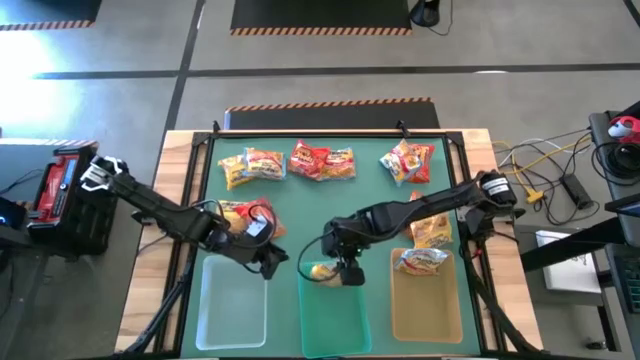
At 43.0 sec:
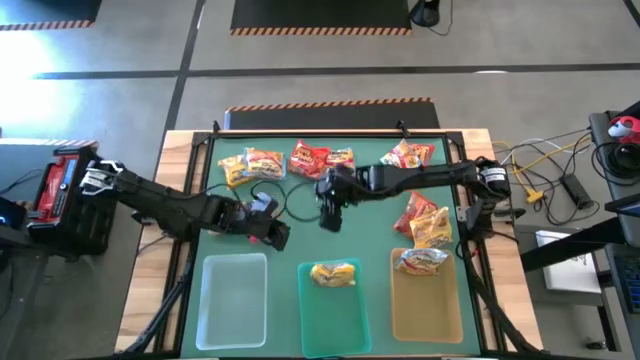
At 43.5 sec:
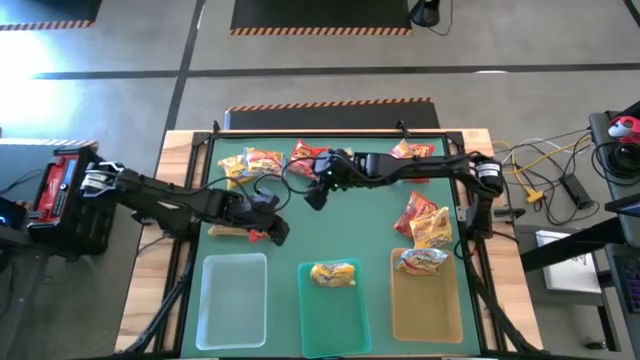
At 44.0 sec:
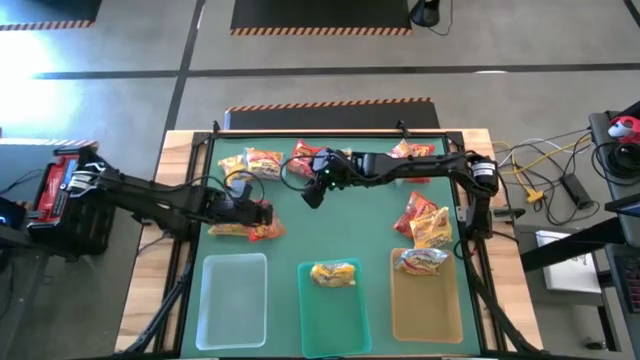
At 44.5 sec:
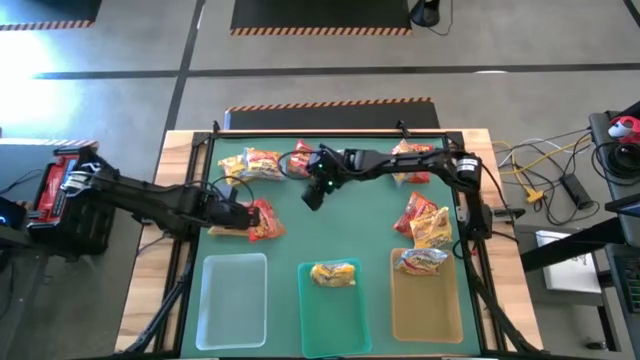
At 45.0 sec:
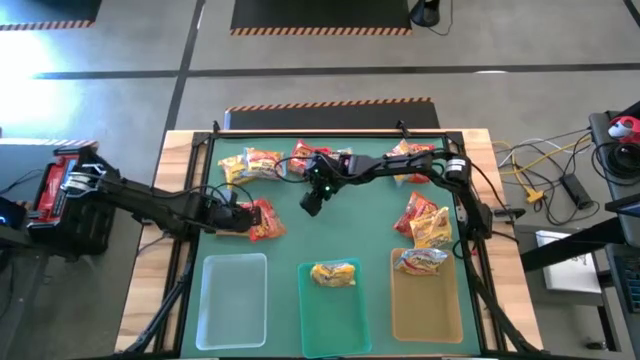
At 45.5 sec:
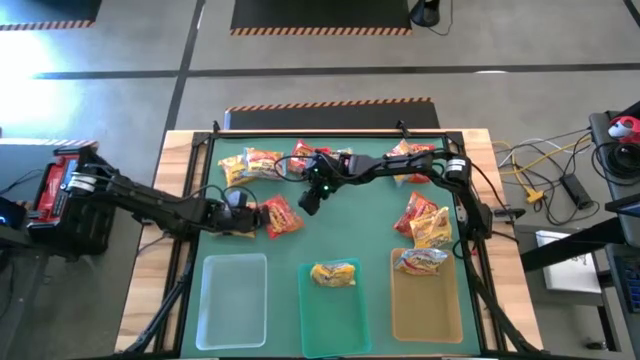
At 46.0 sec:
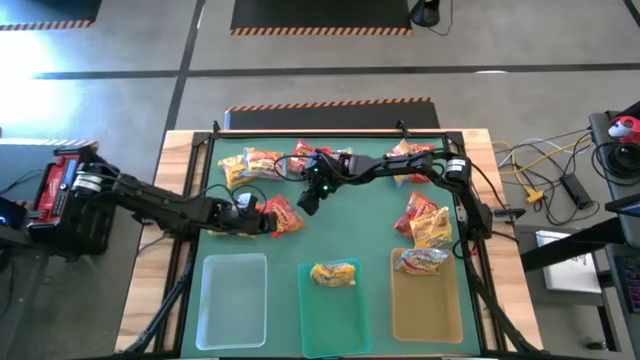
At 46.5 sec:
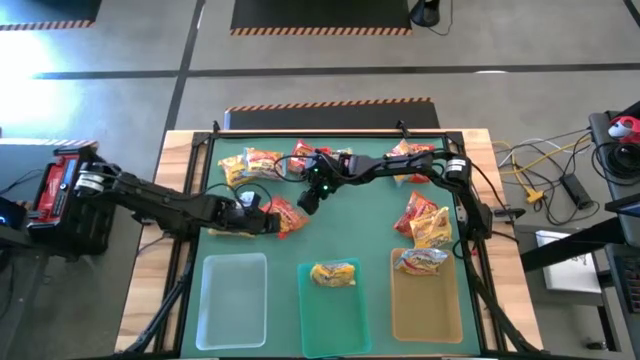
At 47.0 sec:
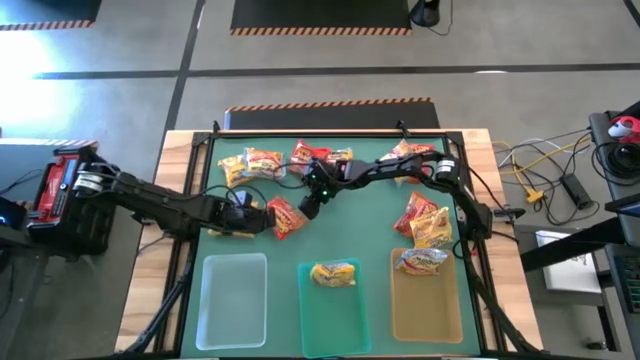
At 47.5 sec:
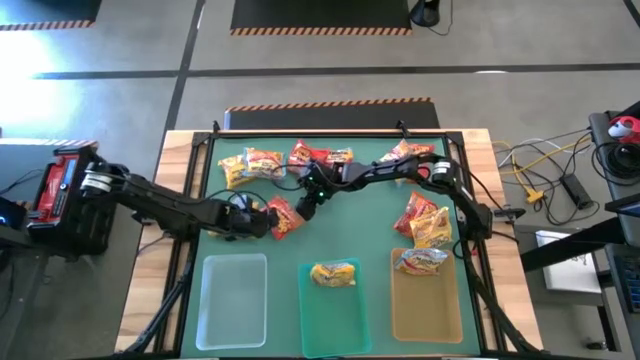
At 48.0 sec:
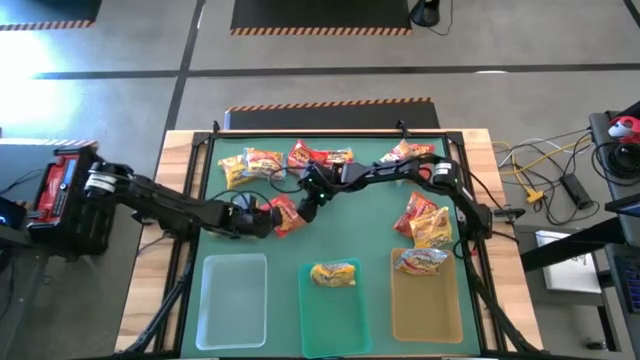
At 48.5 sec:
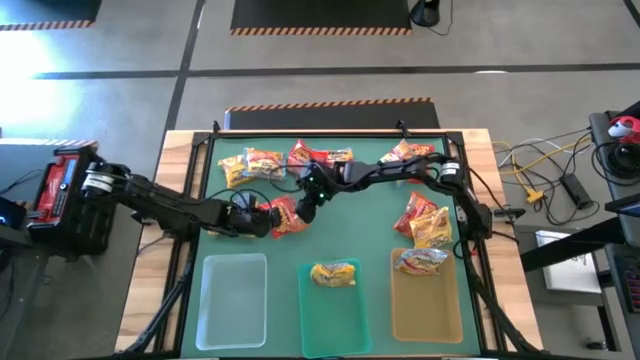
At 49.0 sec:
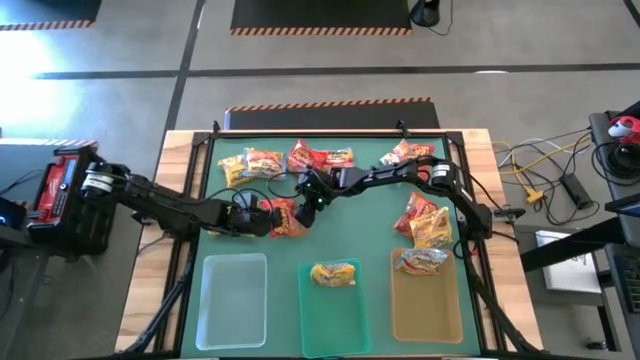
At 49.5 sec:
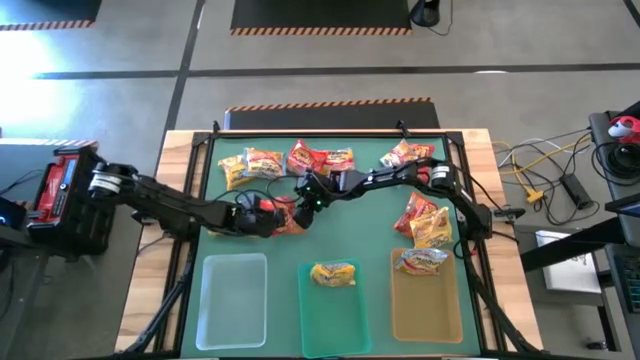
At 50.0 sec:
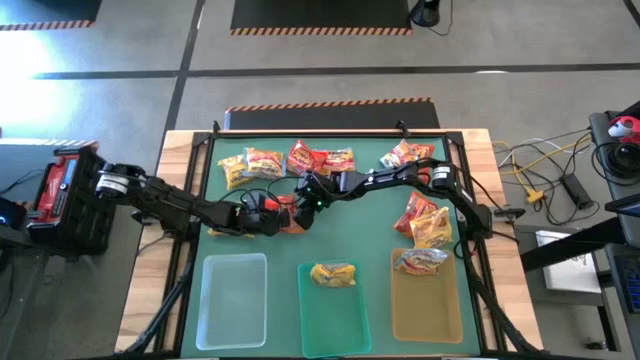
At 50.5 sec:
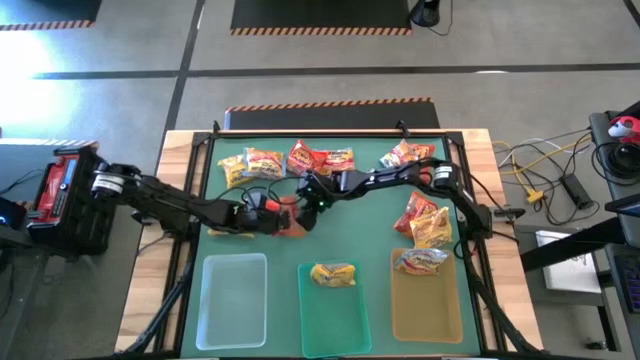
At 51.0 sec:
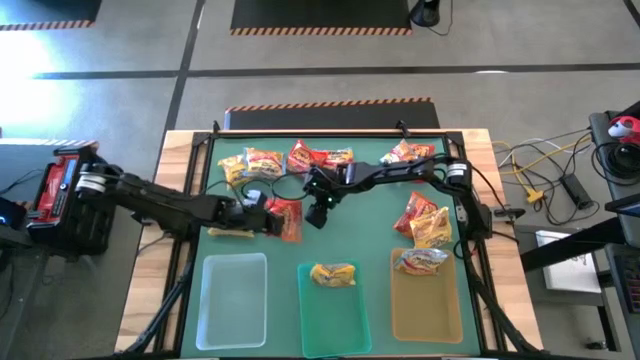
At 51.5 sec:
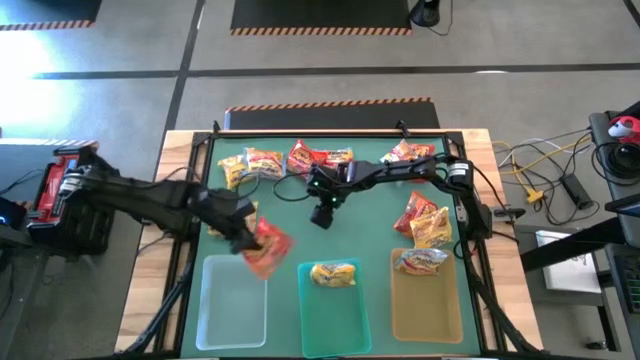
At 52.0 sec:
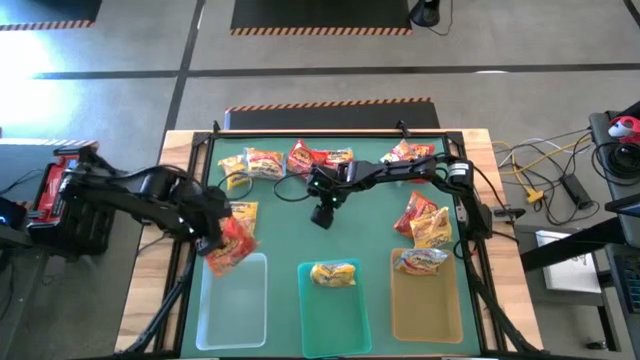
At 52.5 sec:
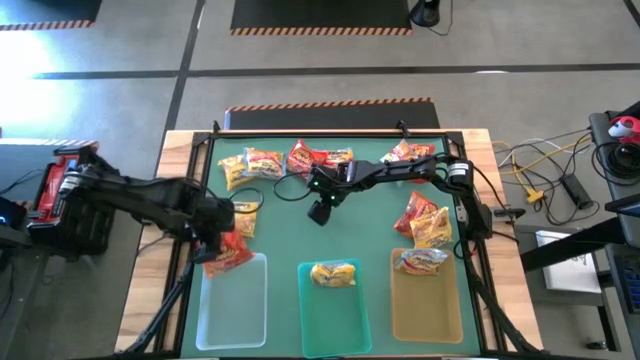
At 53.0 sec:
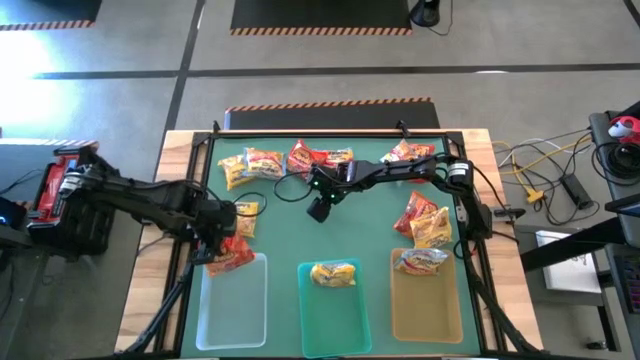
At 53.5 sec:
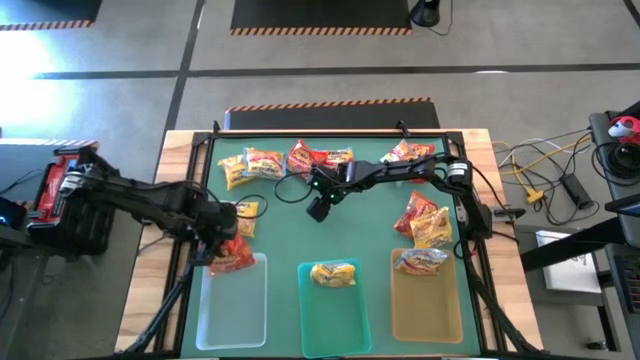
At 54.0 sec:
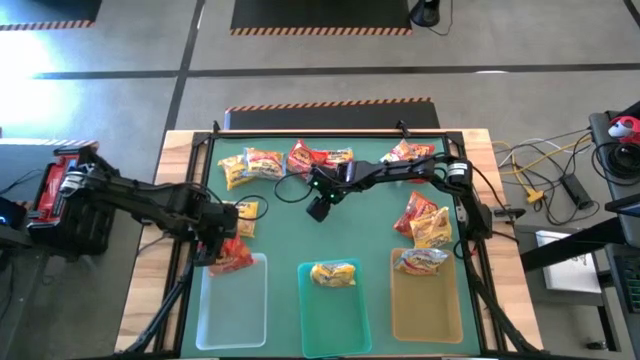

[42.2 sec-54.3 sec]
Task: Sort Maruchan noodles
Put the orange noodle pack into the white bin

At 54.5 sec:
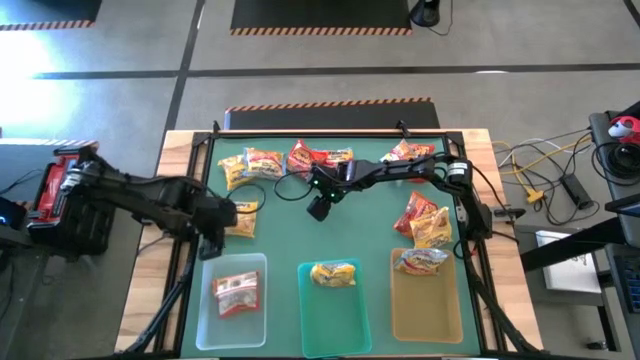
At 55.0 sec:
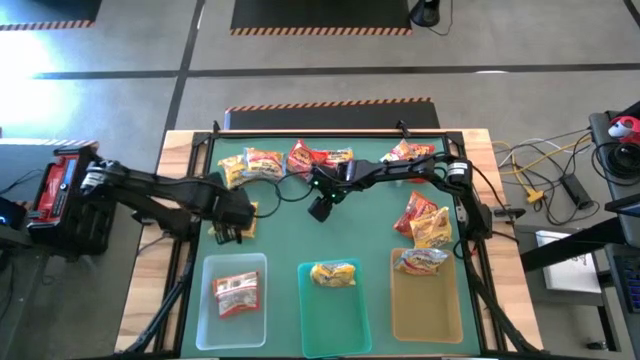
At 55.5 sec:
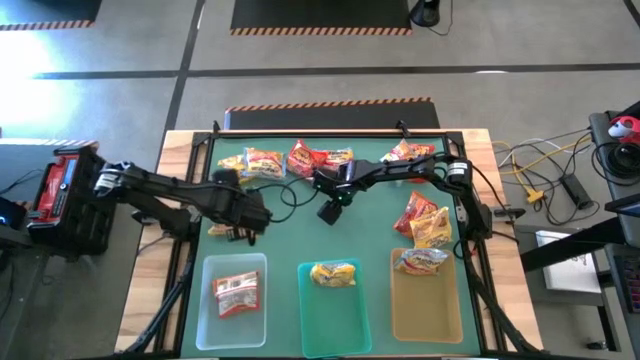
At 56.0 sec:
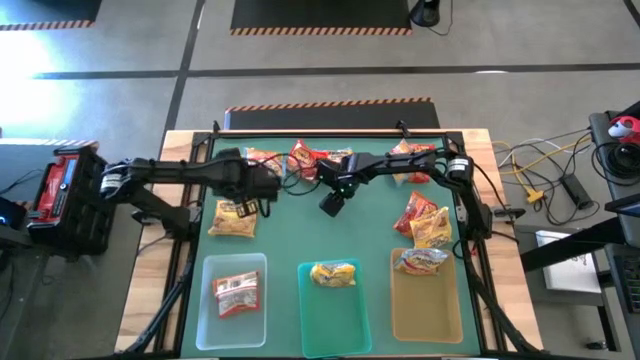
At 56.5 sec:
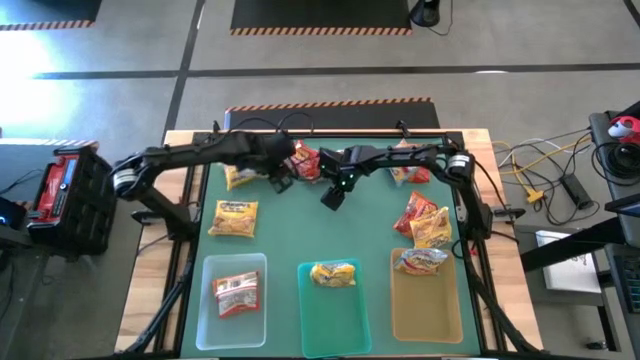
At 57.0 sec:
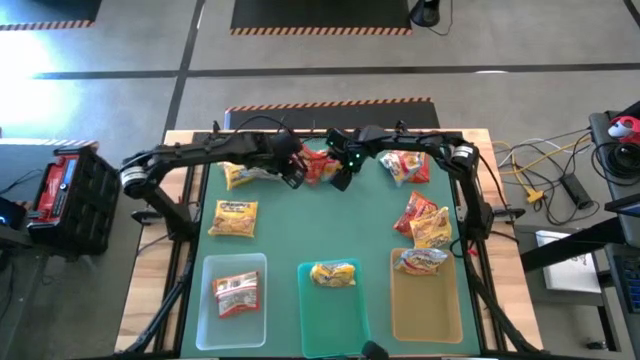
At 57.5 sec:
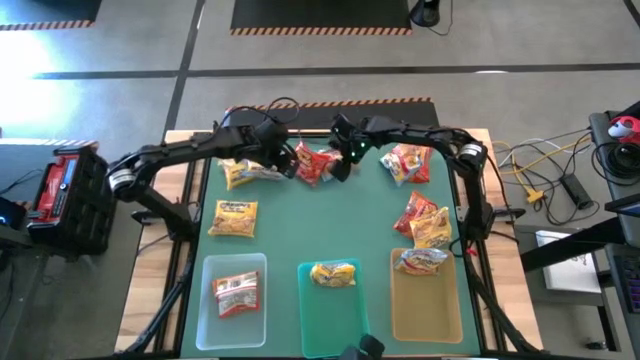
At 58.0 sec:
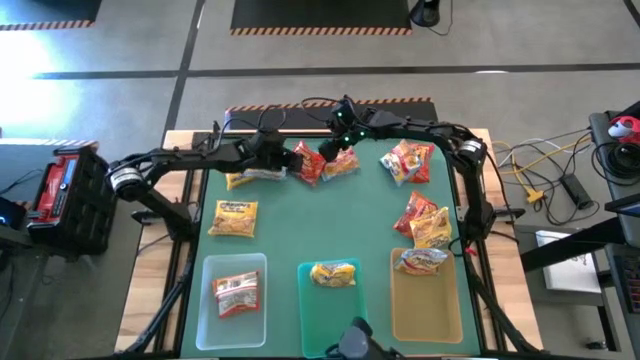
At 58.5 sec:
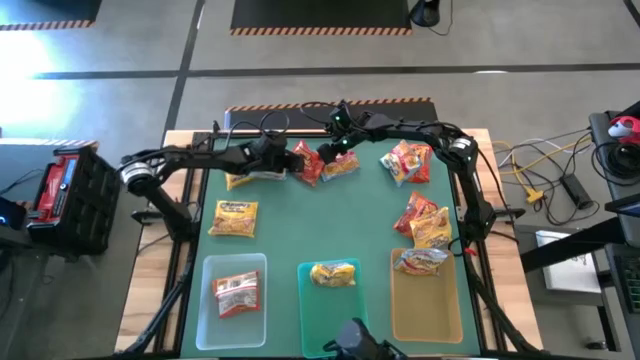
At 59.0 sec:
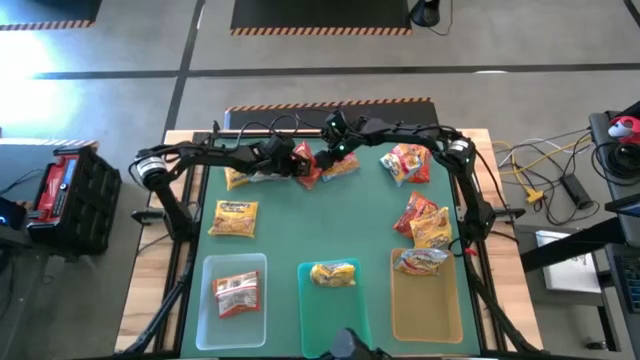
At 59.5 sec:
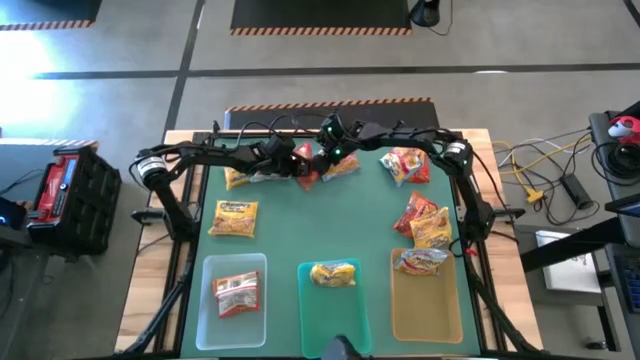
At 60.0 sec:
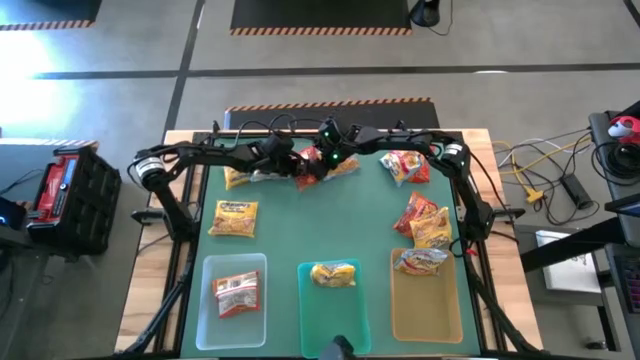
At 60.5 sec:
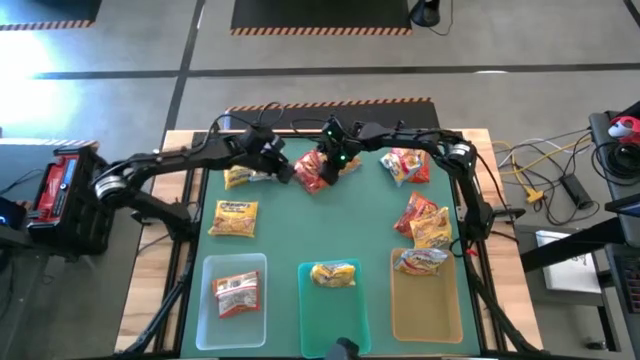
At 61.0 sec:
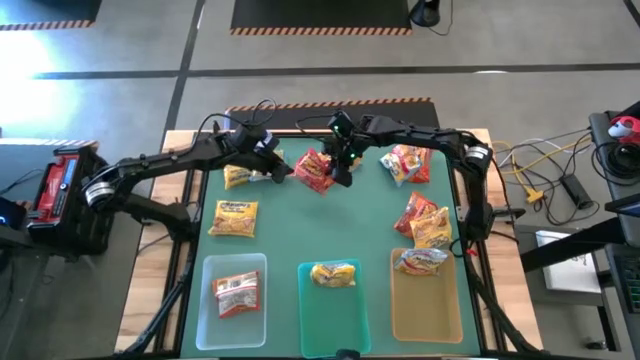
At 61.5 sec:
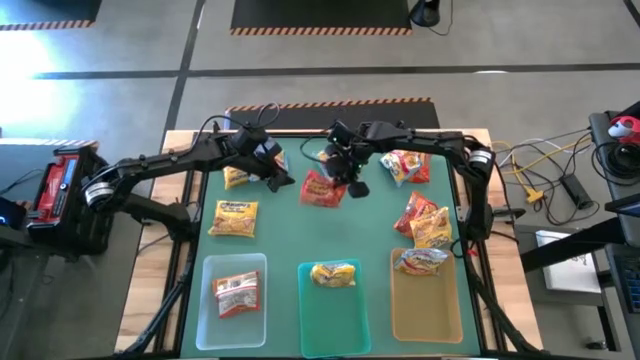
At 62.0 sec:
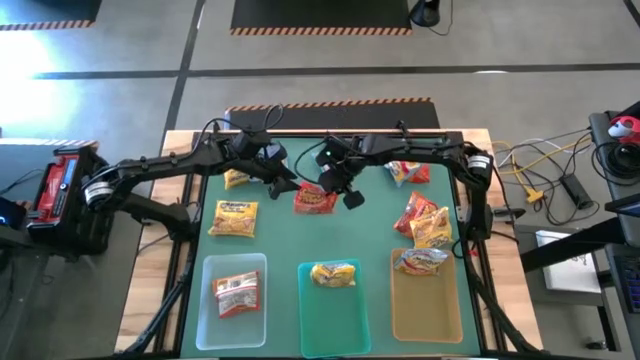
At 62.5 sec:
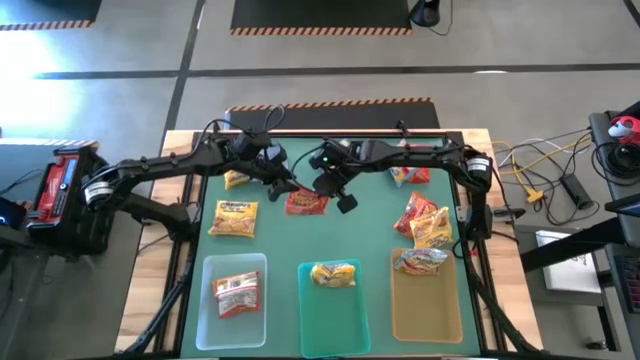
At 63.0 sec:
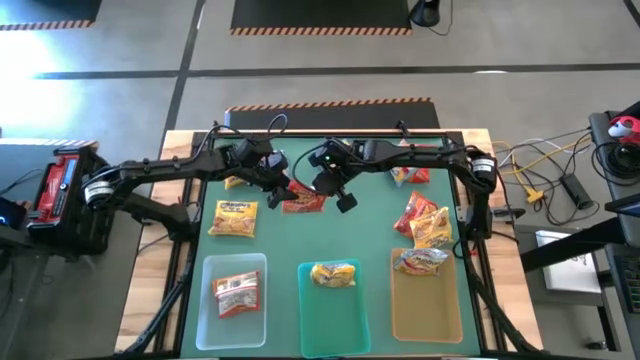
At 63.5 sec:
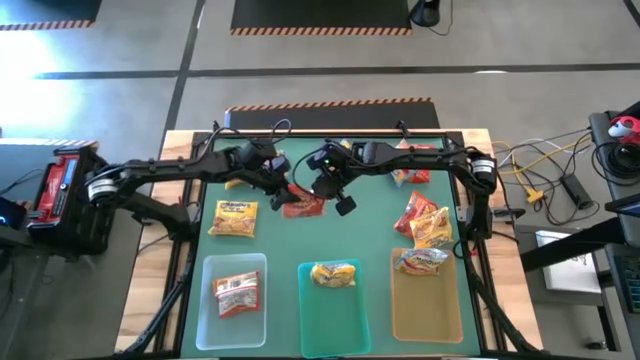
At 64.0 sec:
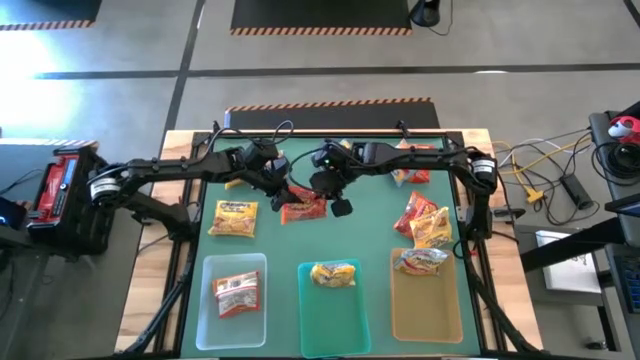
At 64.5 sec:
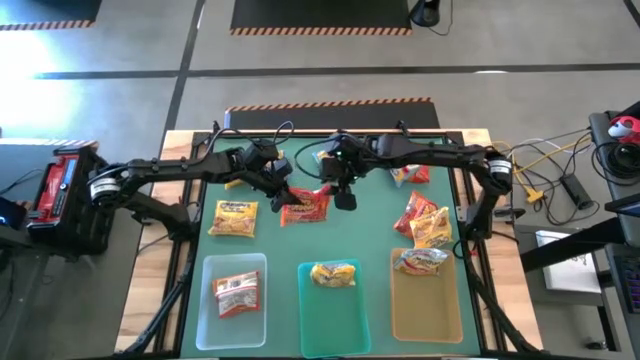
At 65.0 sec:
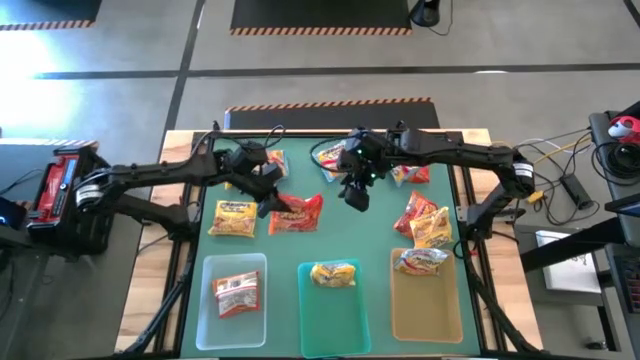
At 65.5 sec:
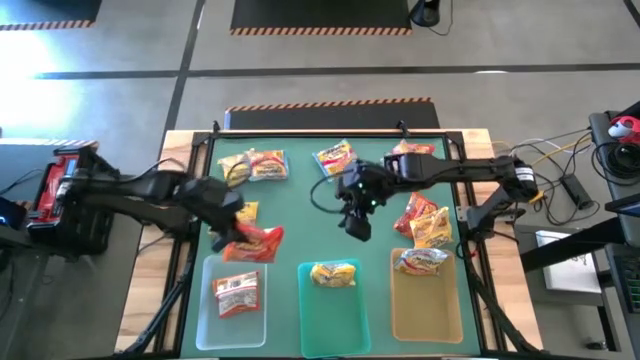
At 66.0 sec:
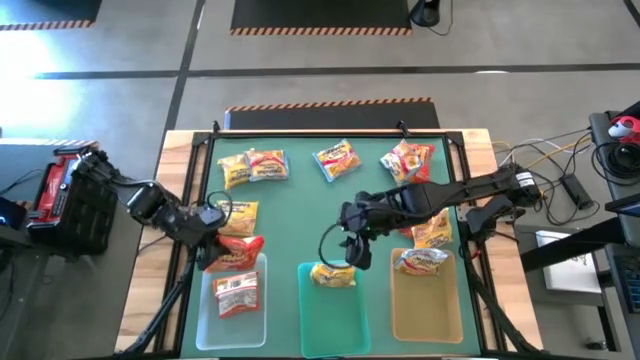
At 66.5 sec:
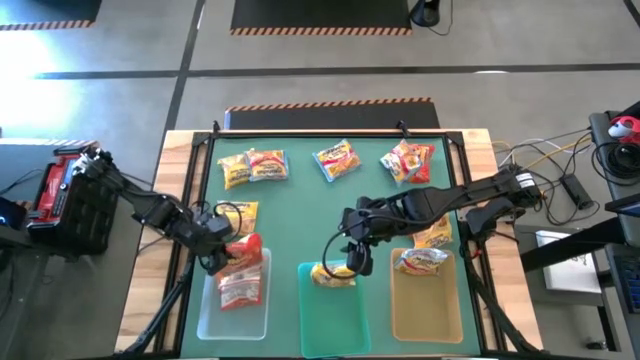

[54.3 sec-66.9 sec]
Put the orange noodle pack into the white bin
